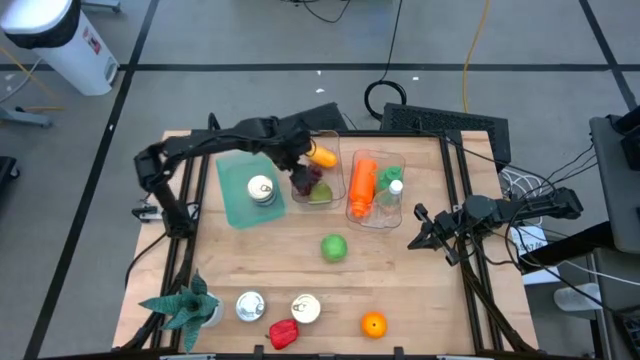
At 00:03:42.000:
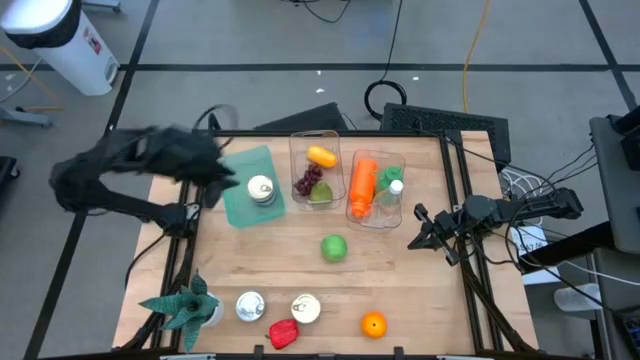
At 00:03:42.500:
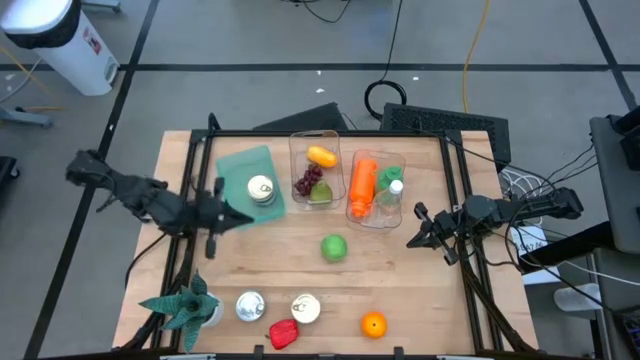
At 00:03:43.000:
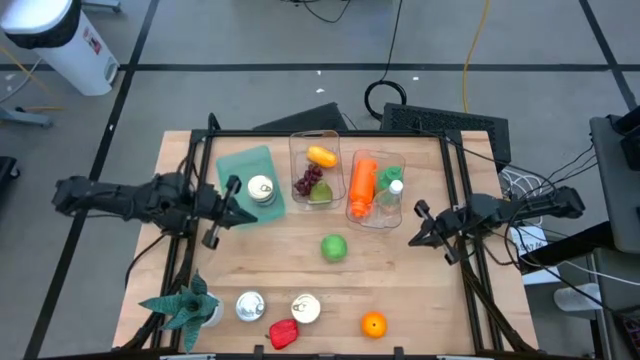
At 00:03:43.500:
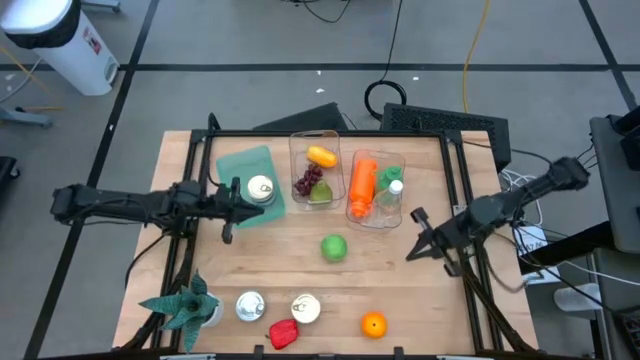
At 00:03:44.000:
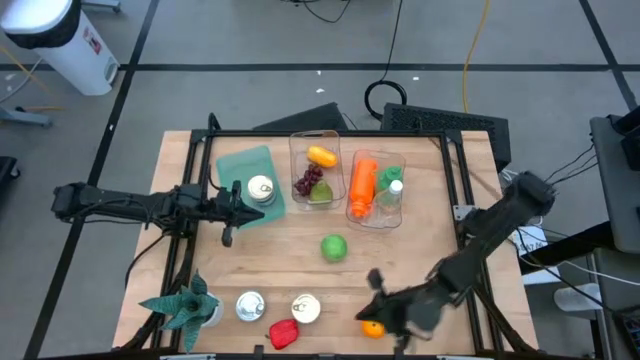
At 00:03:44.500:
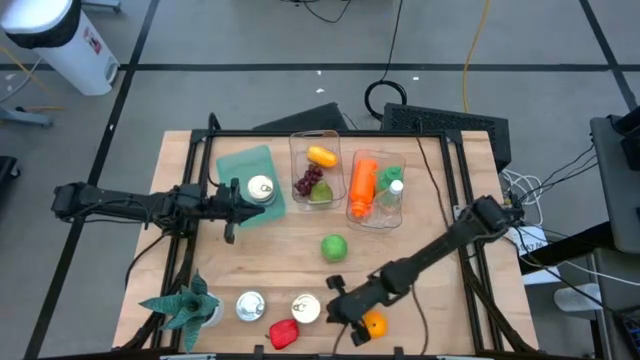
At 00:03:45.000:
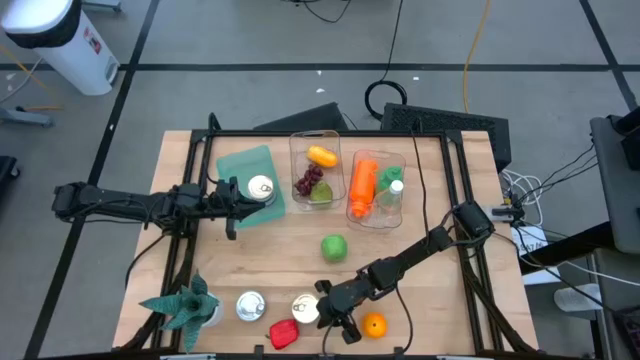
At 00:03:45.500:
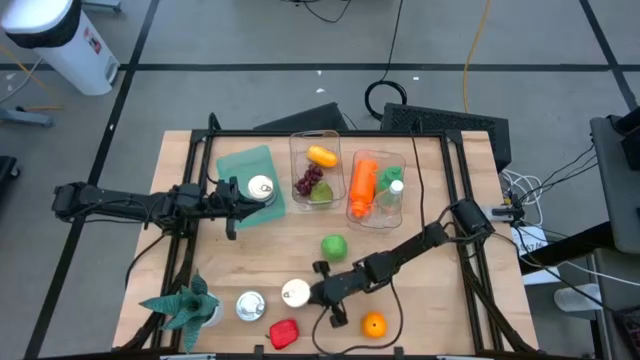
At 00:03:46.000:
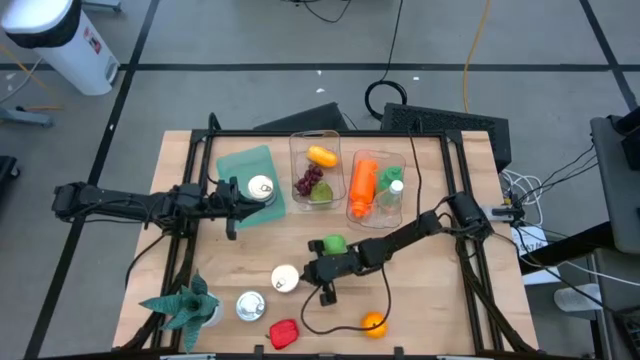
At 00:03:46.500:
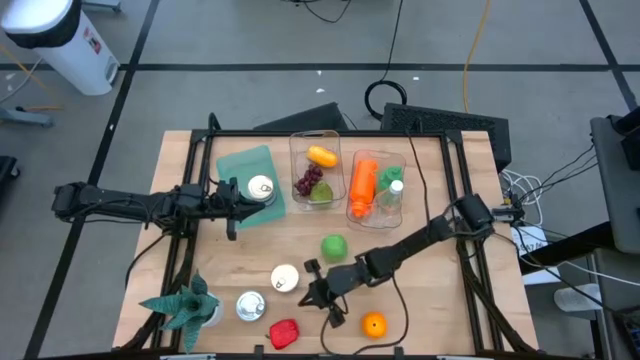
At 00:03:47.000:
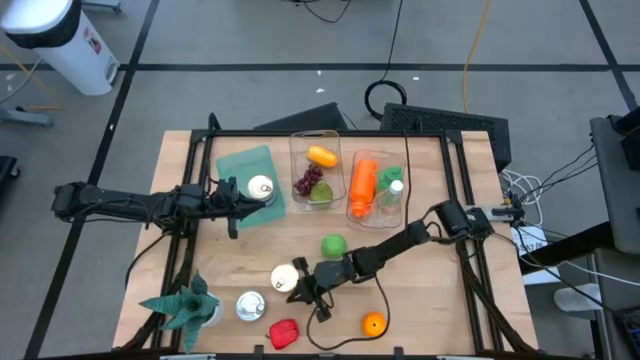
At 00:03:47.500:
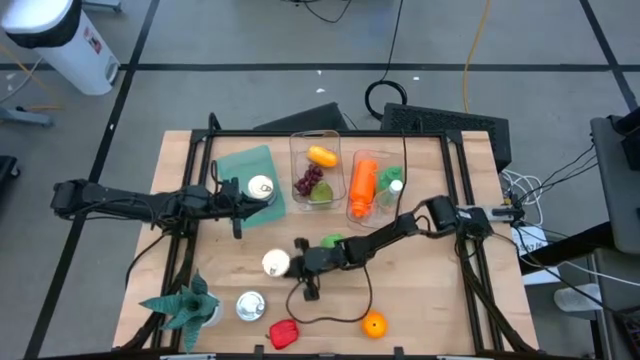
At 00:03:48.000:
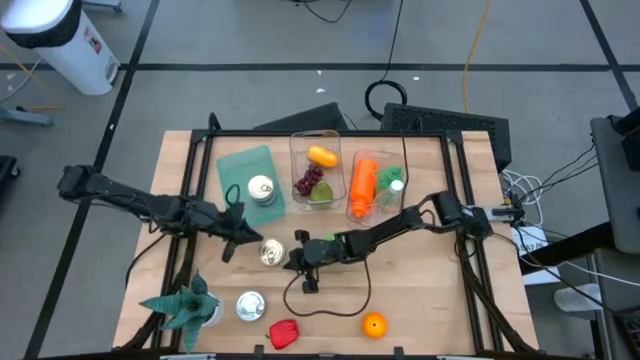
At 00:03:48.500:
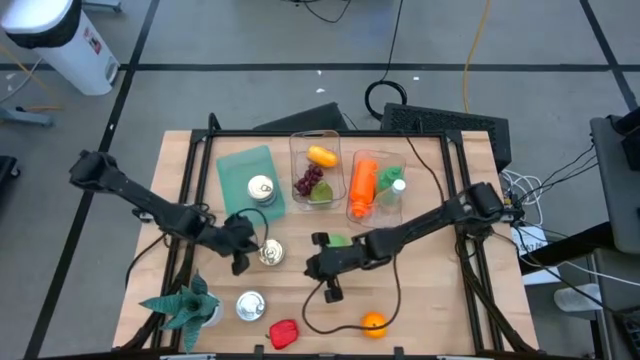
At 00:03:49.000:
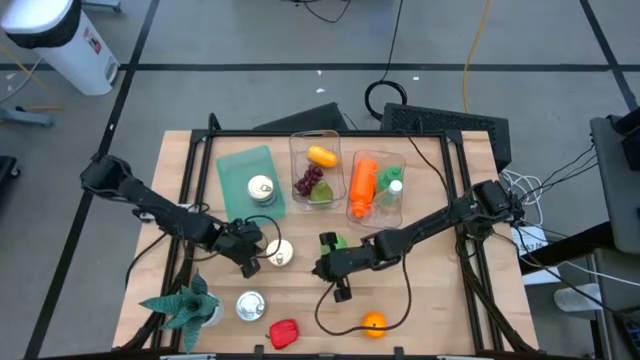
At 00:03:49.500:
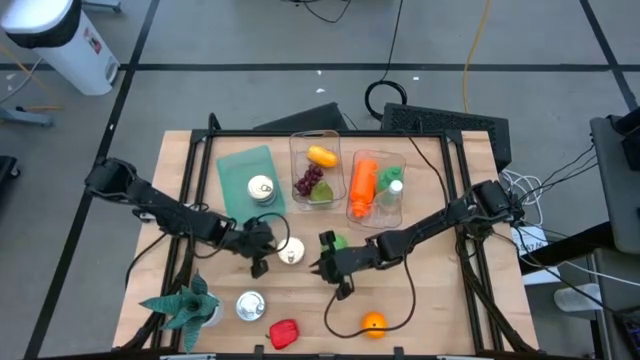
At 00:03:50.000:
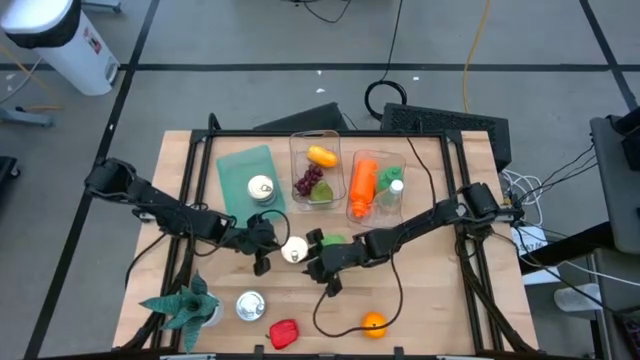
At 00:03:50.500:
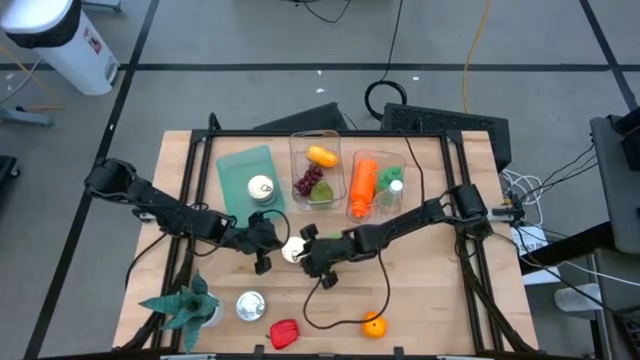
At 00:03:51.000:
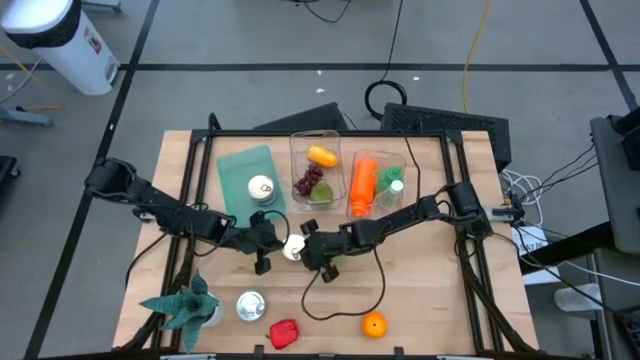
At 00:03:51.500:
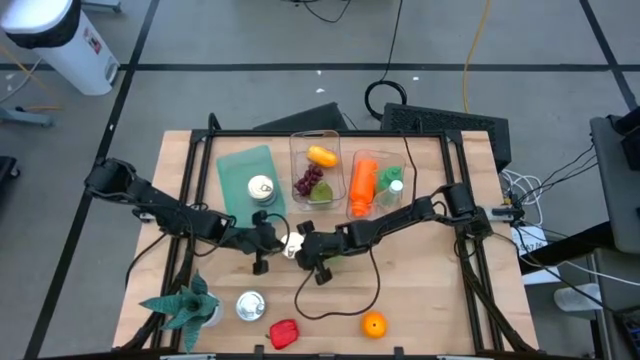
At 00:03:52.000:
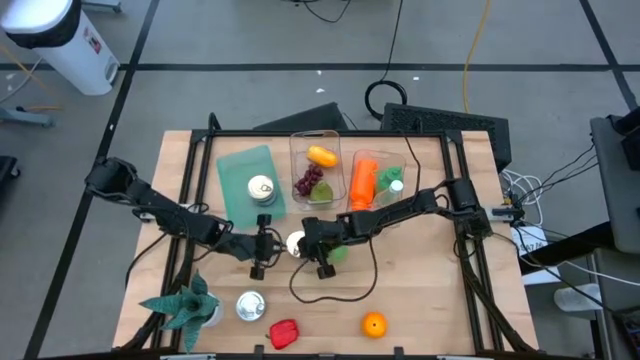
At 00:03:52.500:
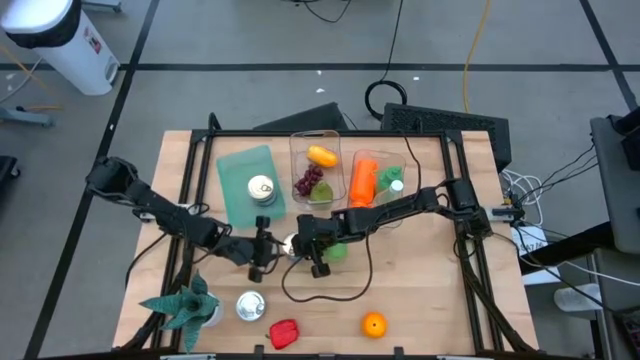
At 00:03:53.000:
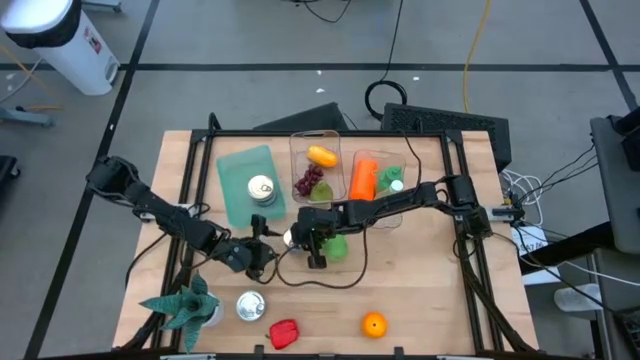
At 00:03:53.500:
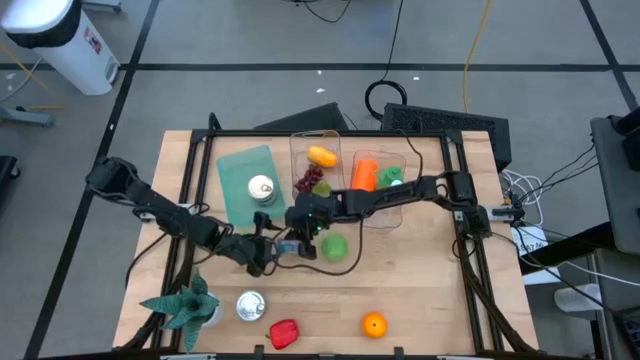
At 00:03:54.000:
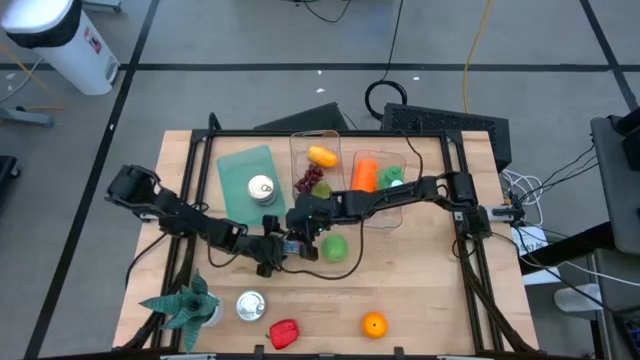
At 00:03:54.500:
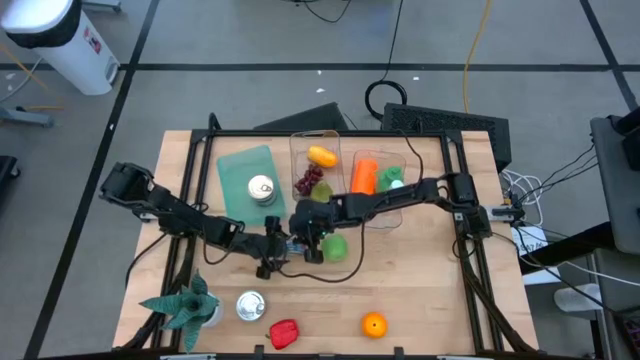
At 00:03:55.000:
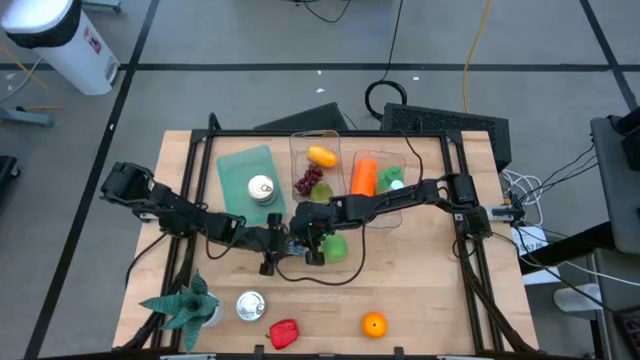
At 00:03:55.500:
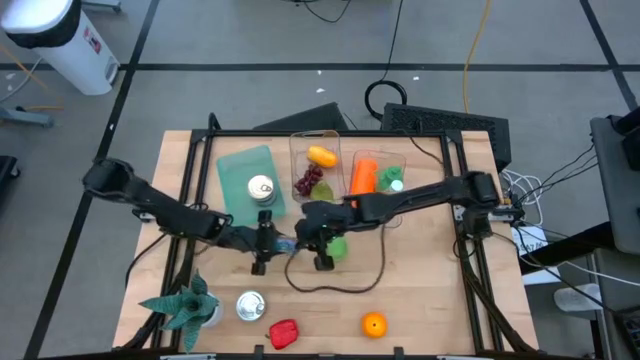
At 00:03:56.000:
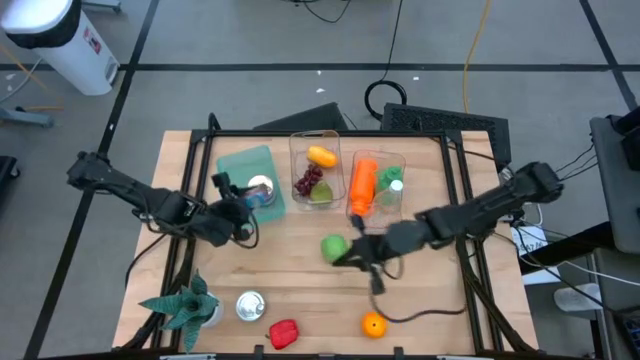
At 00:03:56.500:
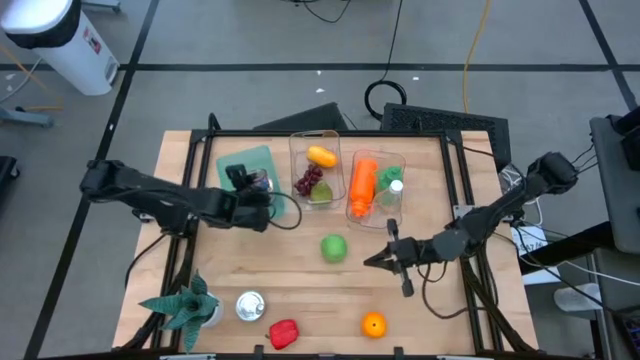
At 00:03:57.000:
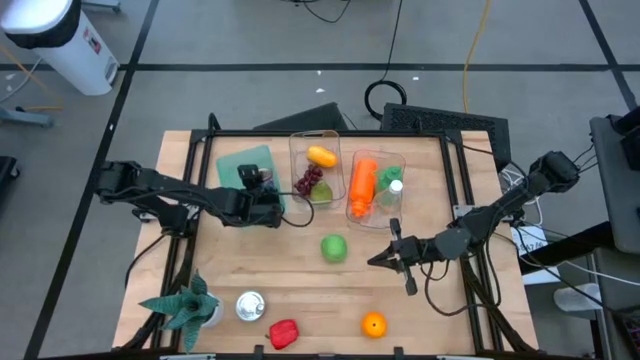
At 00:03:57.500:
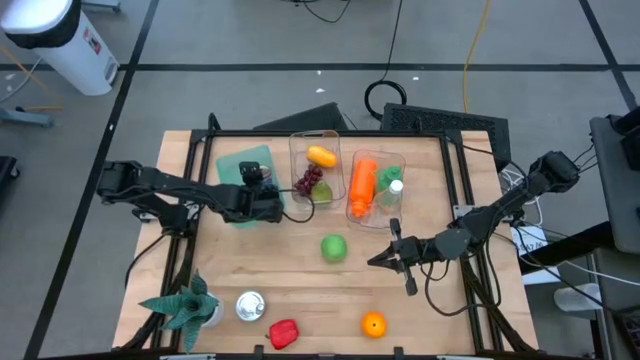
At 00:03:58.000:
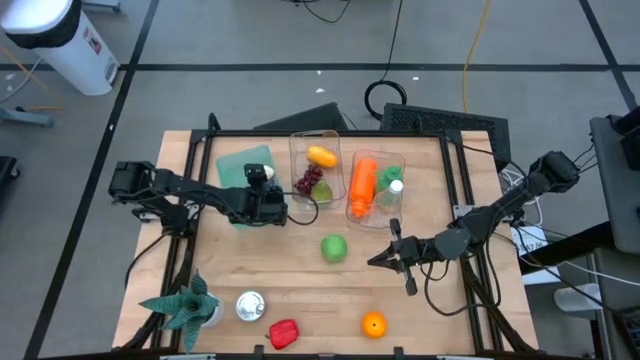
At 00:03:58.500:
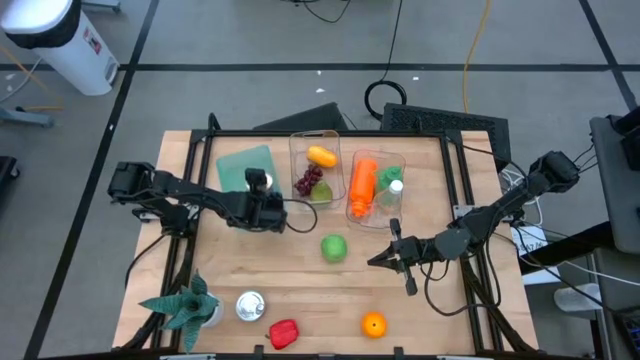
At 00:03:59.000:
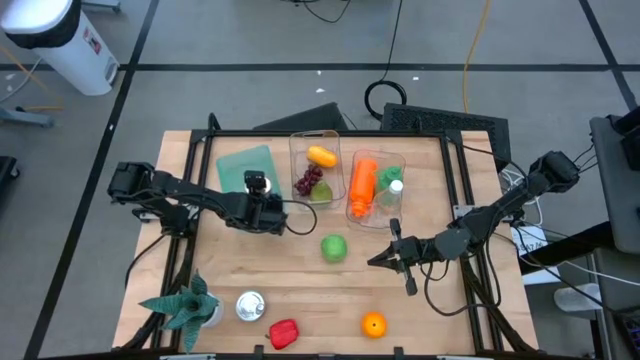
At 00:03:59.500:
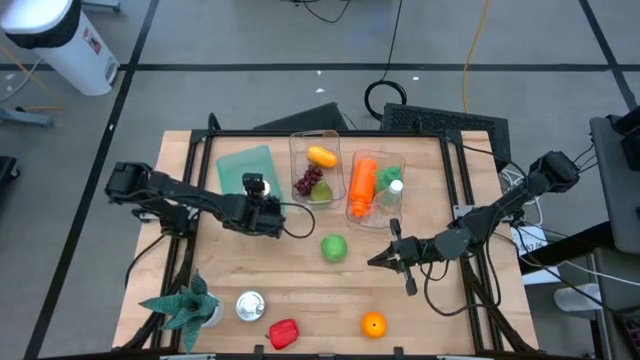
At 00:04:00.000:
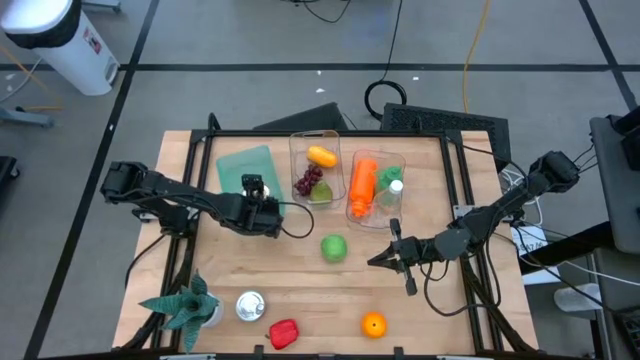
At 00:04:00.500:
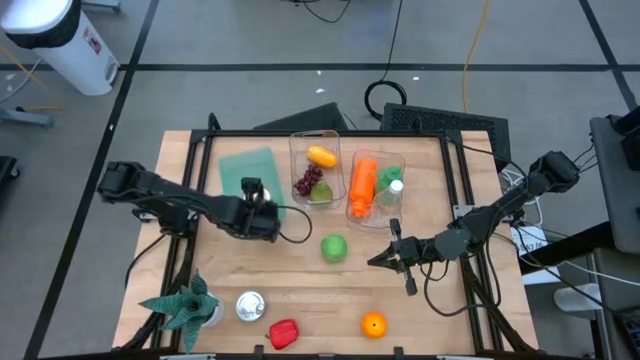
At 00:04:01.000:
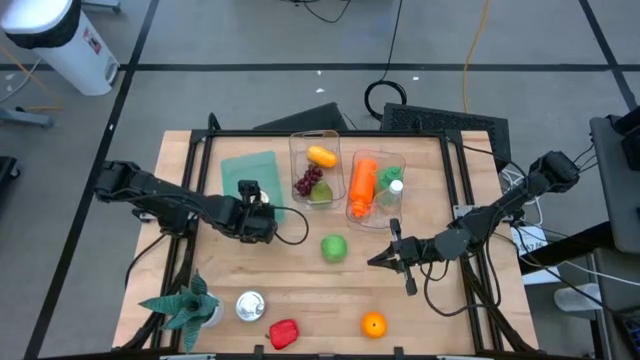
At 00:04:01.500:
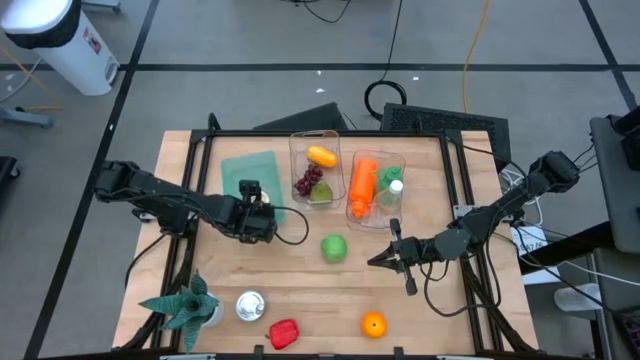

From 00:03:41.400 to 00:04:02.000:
Task: Pick & Place Food Item
Stack the blue tuna can on top of the blue tuna can in the green bin

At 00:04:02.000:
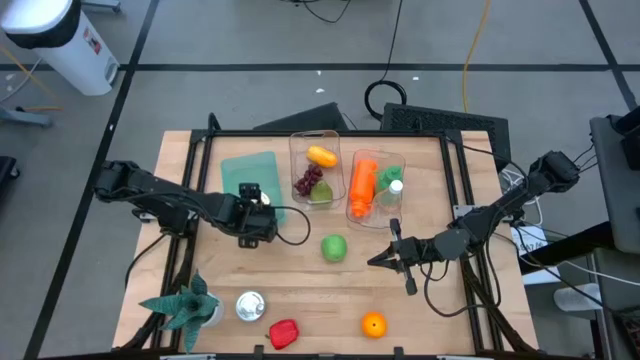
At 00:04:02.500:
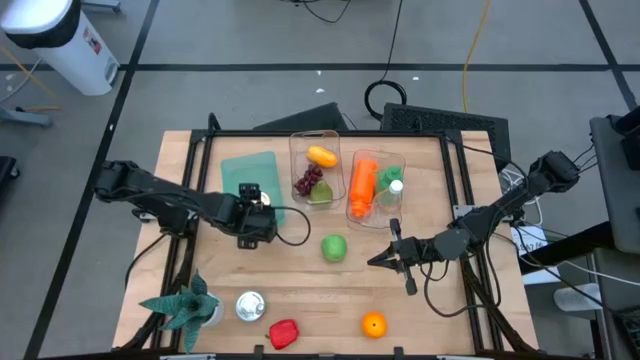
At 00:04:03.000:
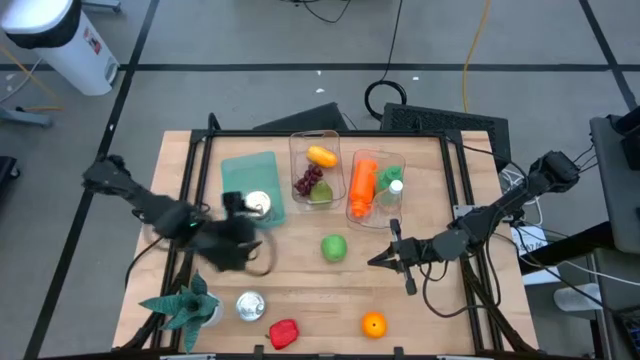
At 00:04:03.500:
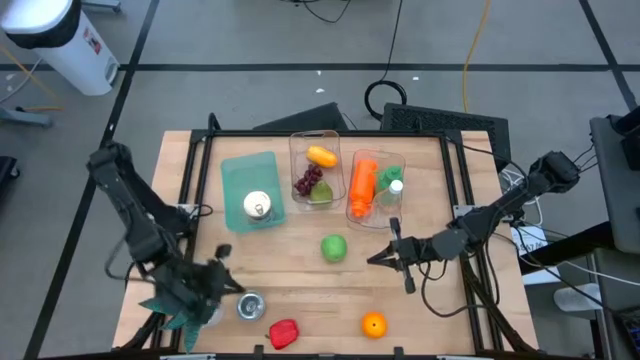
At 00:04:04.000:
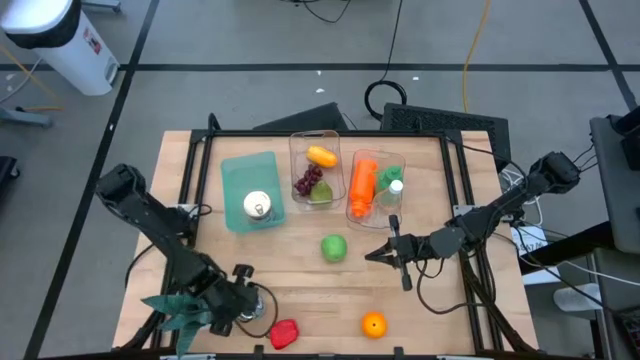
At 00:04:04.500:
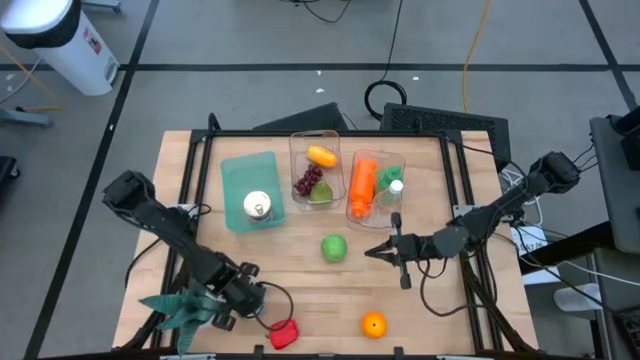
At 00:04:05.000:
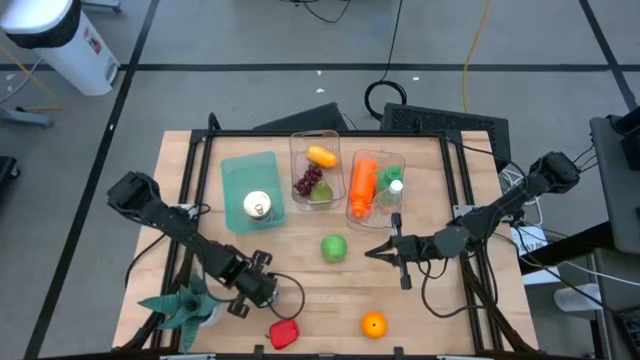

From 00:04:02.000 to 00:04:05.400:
Adjust the green tuna can
